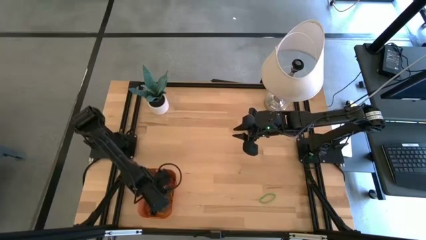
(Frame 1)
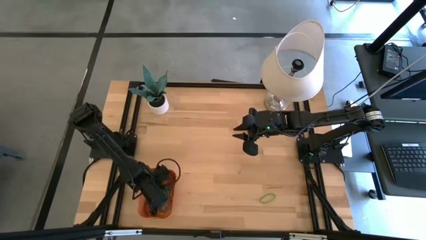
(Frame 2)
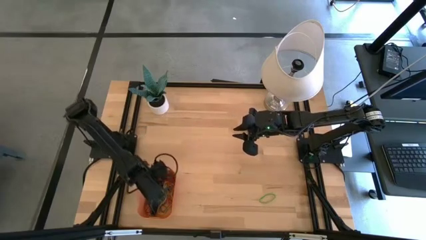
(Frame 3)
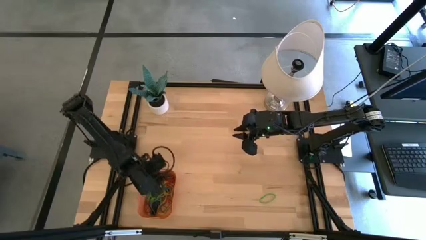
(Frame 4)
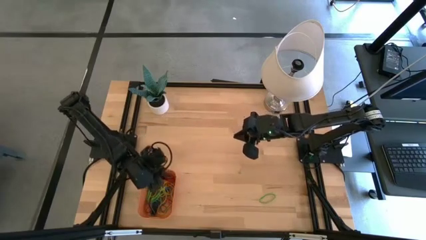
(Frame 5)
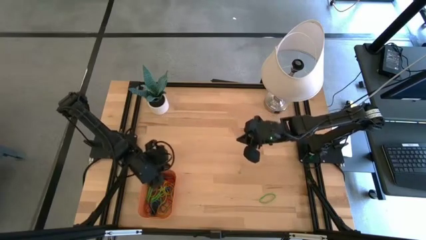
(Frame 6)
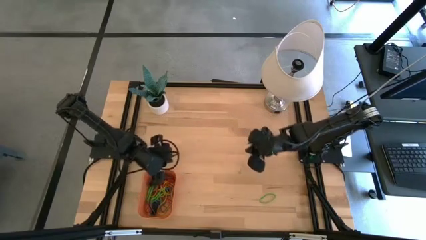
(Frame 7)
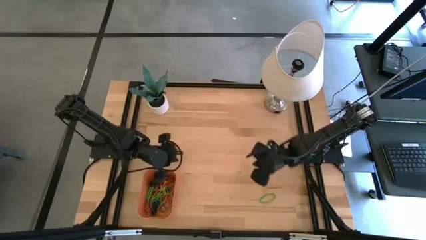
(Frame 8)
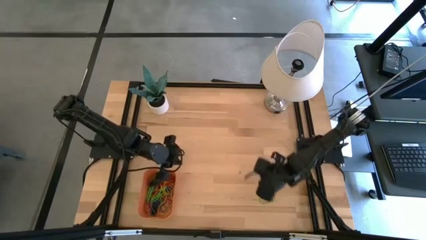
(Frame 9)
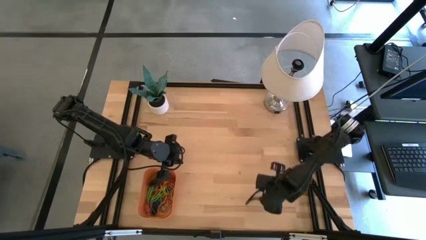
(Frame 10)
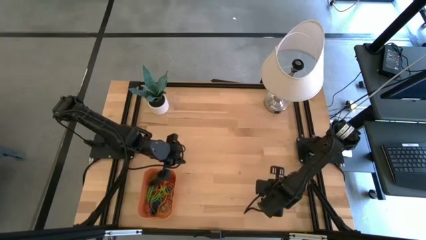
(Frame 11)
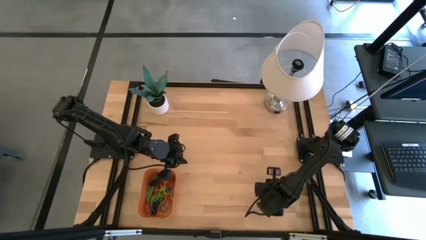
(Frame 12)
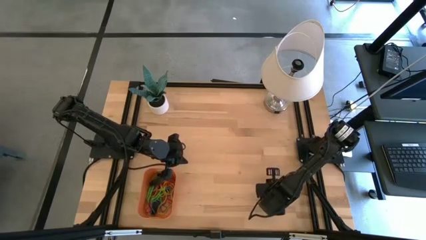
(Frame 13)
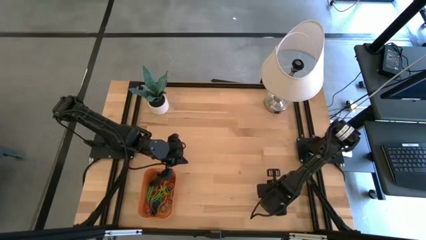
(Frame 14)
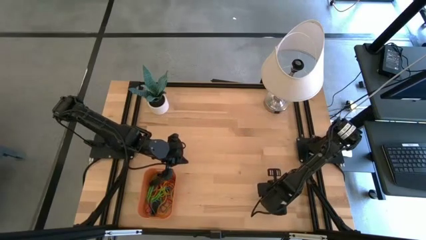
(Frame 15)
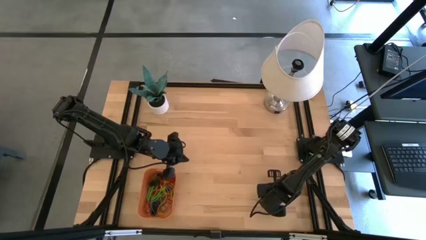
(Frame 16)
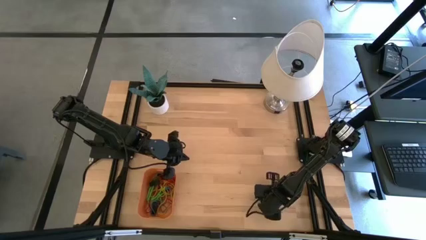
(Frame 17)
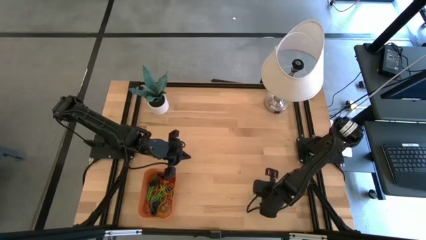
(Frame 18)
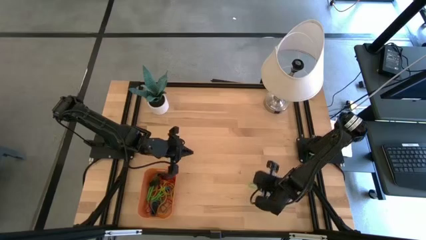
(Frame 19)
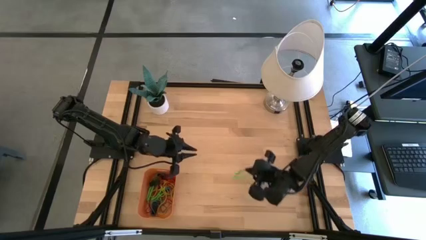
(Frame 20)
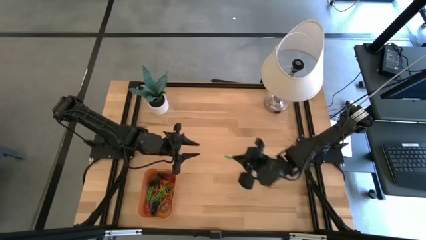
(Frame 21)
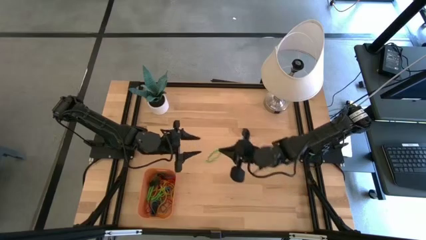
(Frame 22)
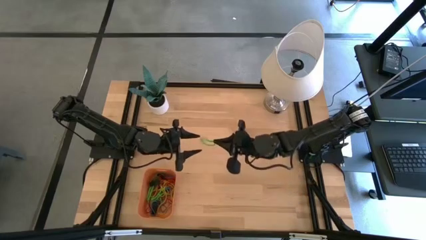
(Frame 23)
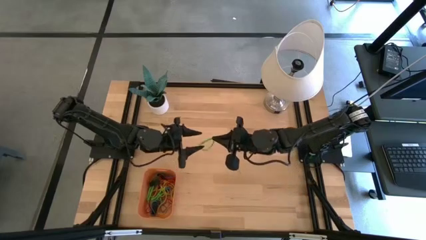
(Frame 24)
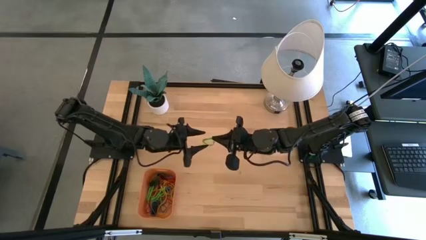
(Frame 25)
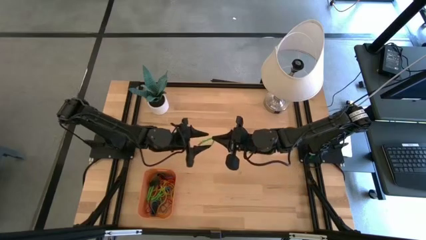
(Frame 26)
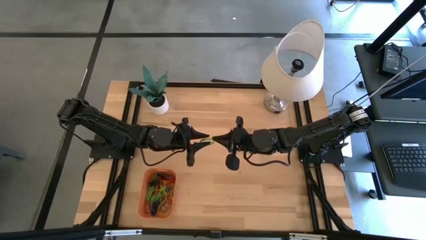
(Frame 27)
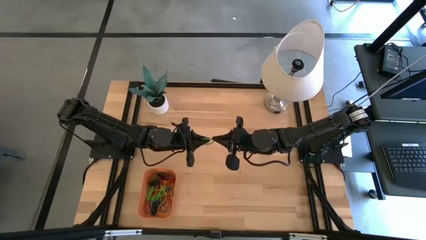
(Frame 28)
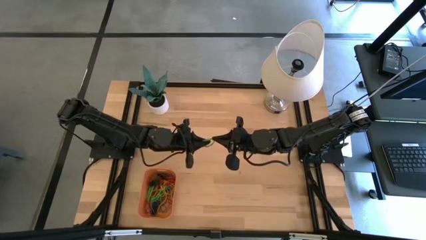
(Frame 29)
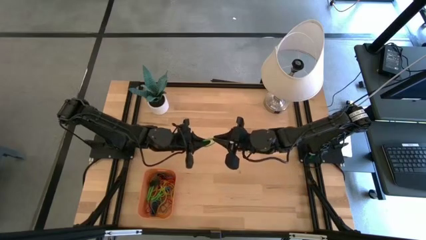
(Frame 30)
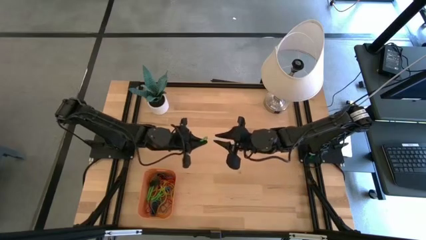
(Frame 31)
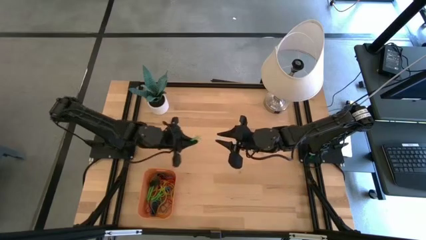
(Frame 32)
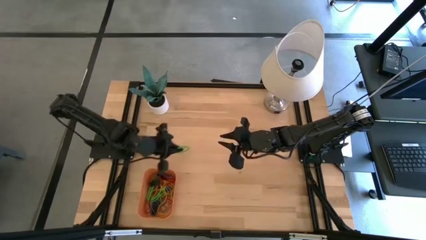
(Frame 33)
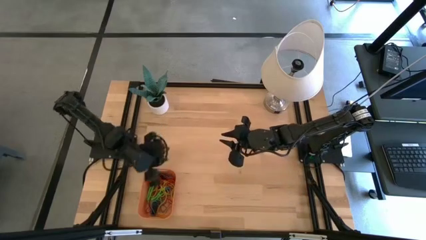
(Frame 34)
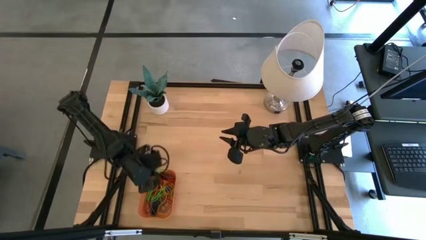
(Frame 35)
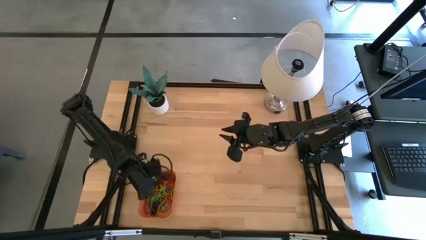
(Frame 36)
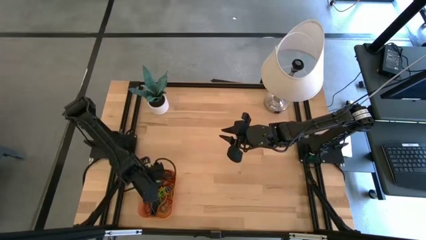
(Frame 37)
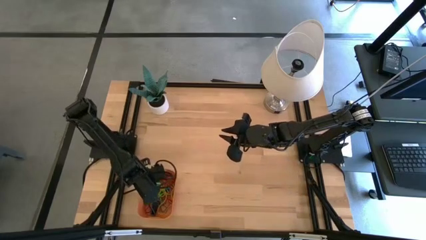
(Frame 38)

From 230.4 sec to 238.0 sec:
Task: Pick and place rubber bands into bin
Put the green rubber band into the orange bin

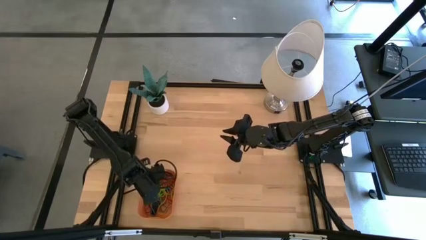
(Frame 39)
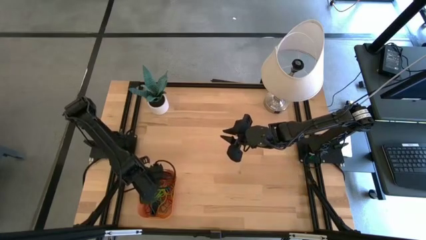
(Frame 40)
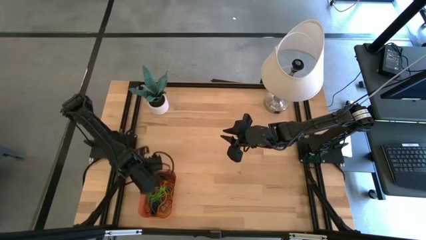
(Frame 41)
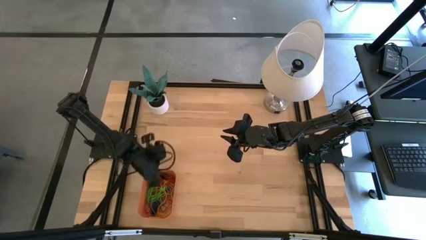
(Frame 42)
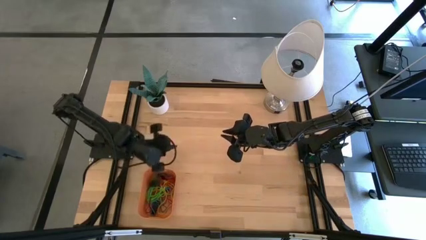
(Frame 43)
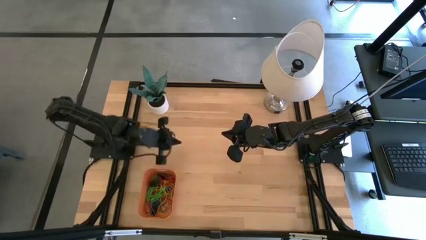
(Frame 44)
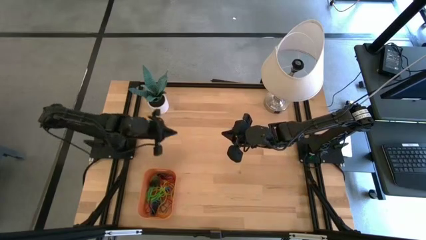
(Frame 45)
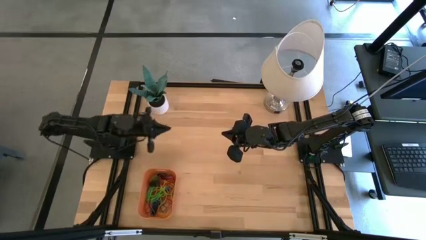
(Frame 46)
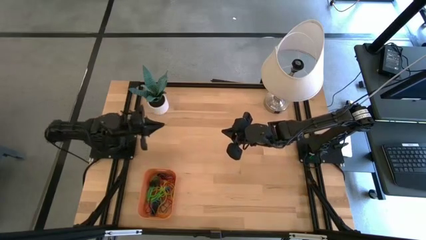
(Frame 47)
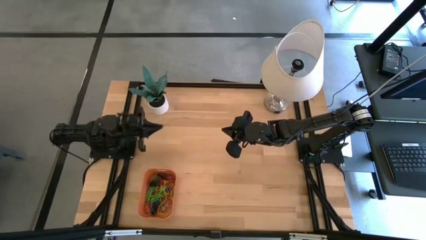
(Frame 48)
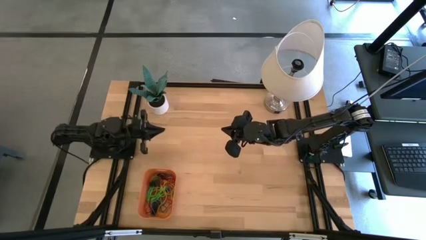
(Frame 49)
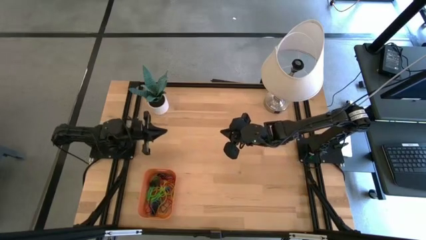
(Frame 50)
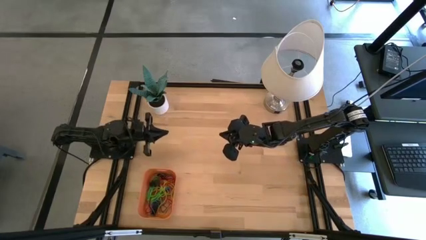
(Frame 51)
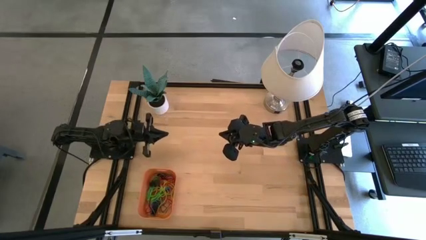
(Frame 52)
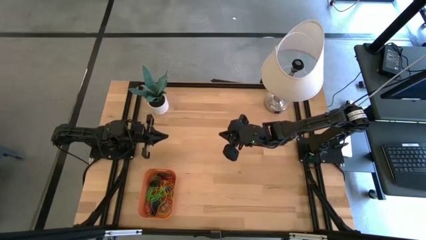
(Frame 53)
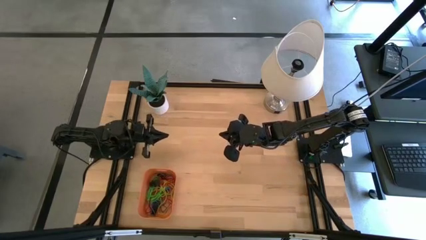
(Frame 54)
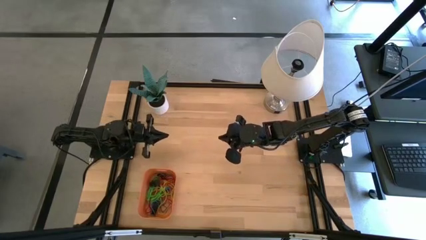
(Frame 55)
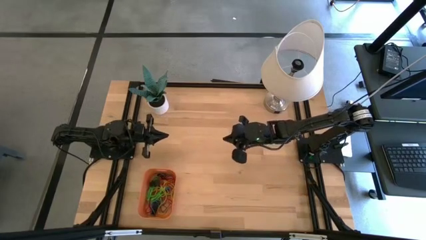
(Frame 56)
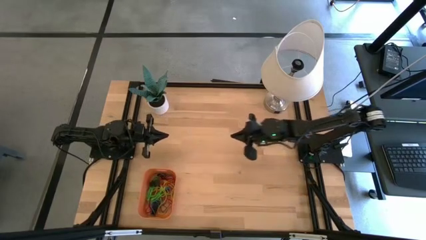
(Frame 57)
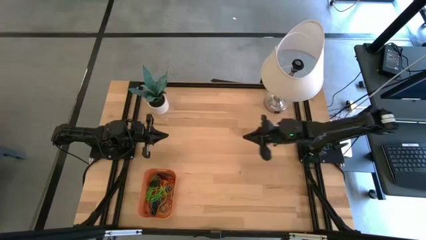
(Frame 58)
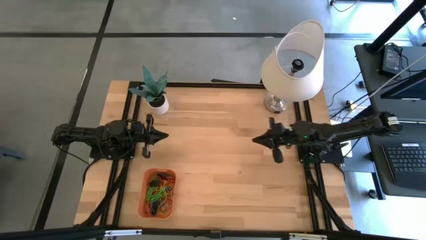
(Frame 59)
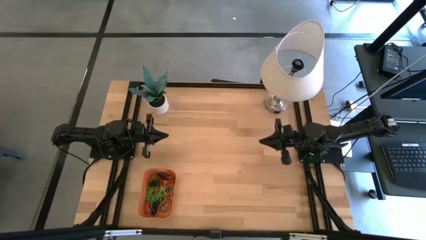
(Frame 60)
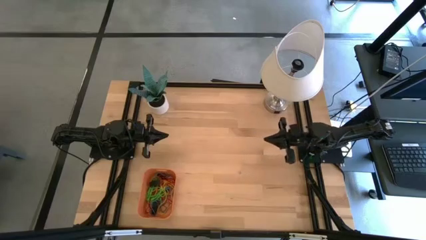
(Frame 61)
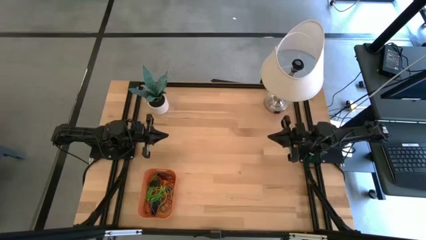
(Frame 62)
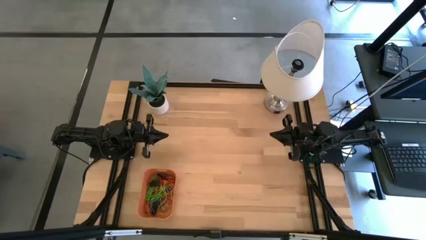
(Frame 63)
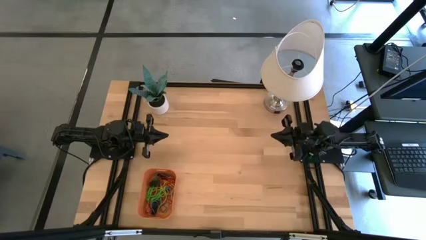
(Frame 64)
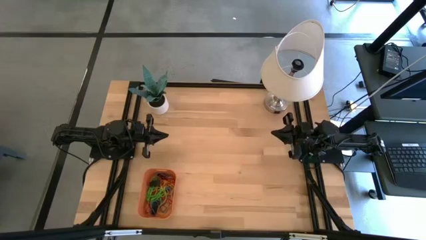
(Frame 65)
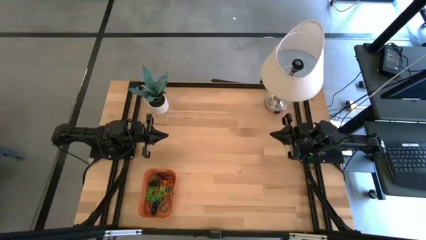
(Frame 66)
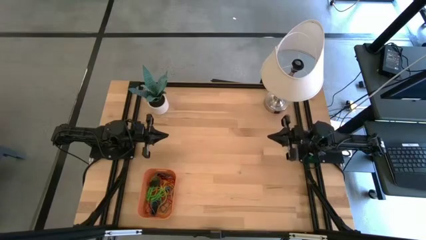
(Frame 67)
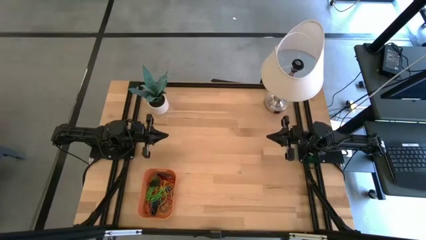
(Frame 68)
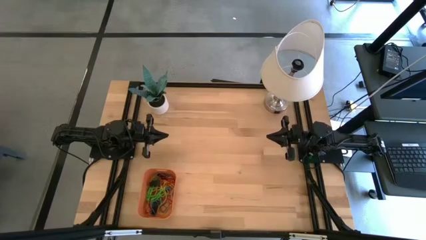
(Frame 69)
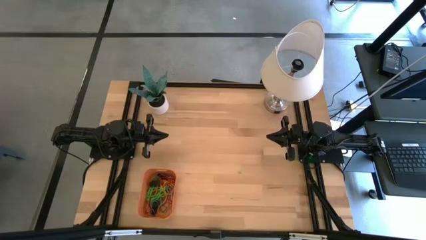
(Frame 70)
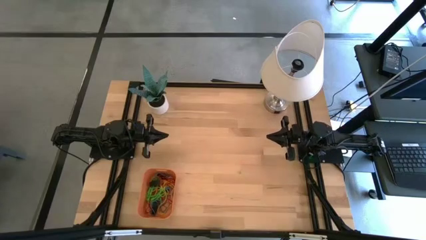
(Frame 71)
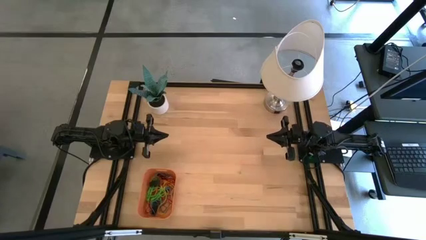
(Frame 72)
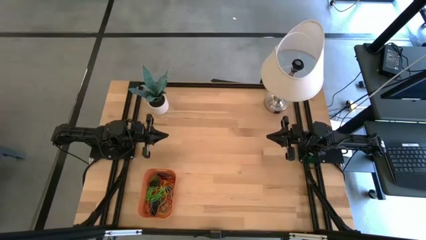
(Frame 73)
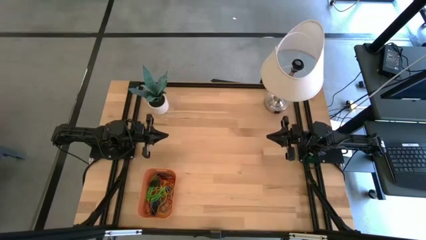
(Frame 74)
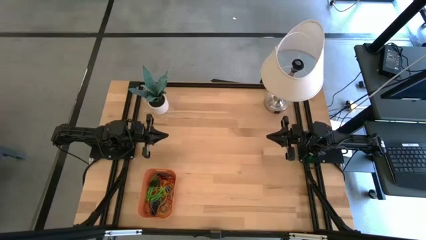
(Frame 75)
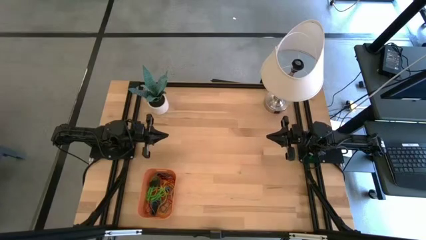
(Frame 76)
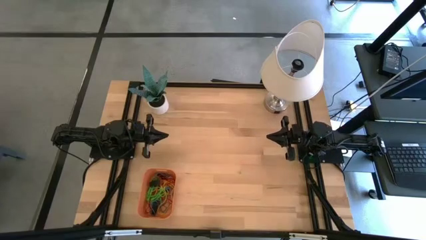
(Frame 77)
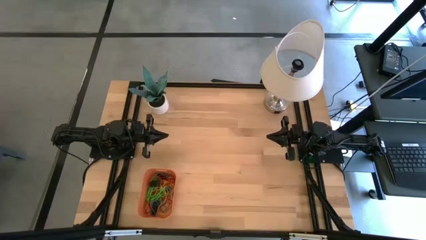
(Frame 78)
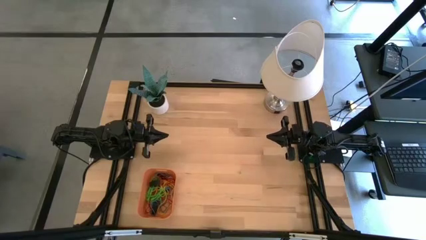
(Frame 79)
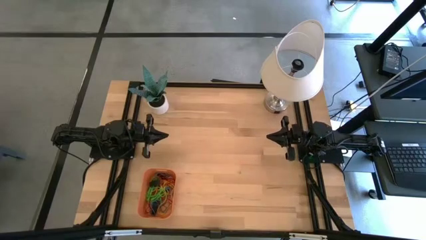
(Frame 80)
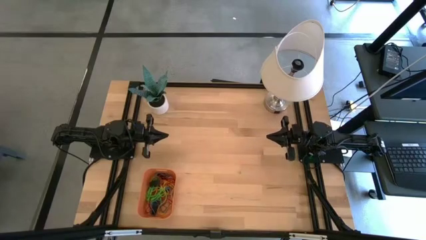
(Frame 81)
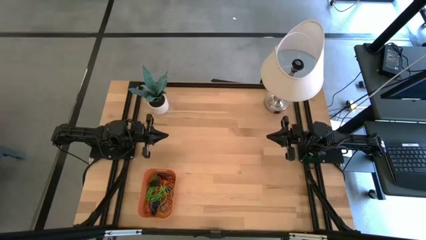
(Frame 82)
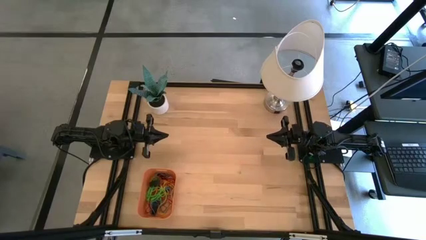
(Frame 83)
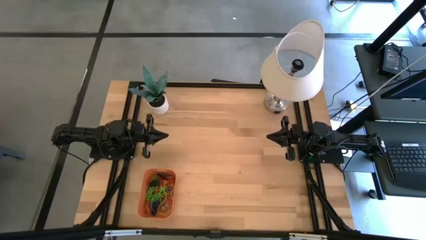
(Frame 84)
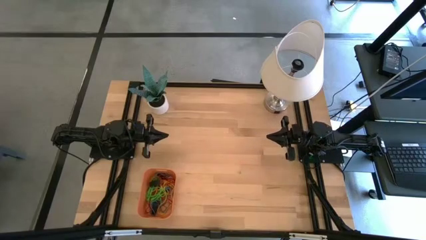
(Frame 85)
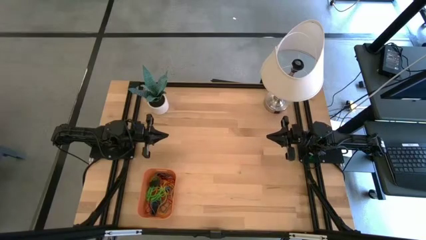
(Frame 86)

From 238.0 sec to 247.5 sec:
Return to Home Position
